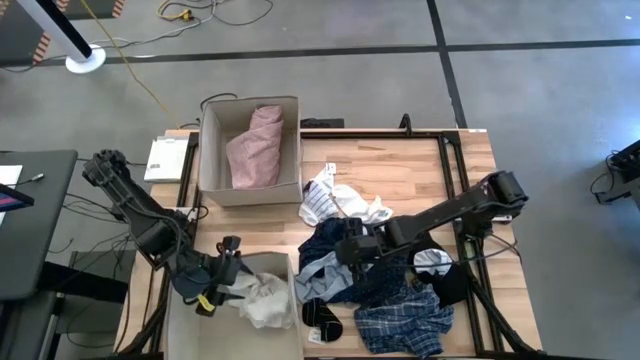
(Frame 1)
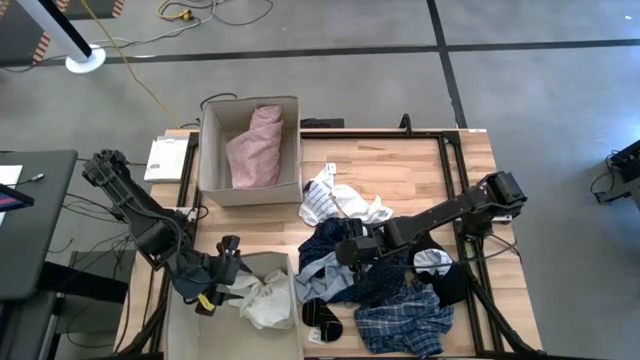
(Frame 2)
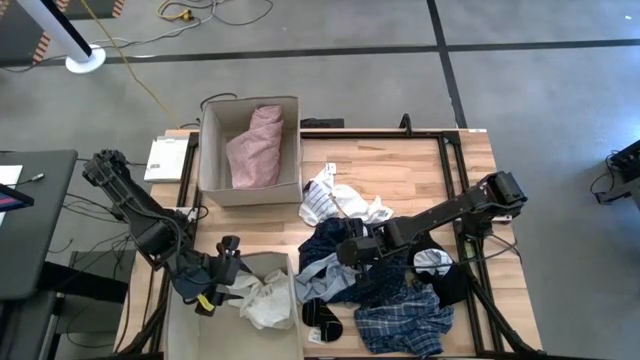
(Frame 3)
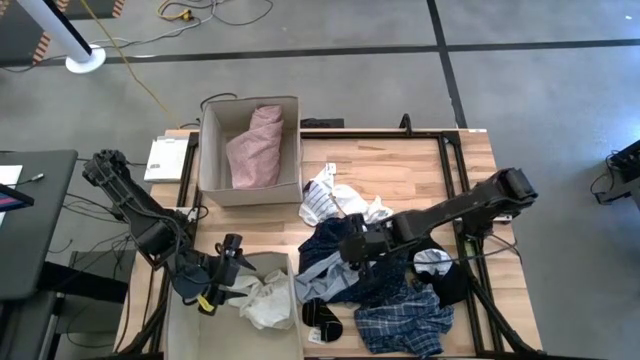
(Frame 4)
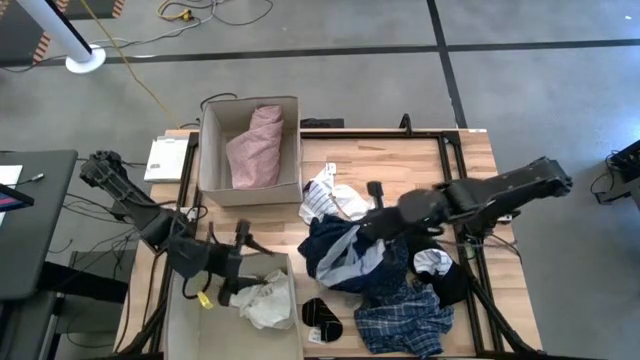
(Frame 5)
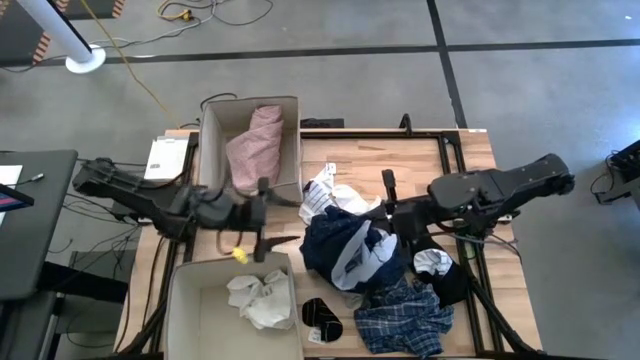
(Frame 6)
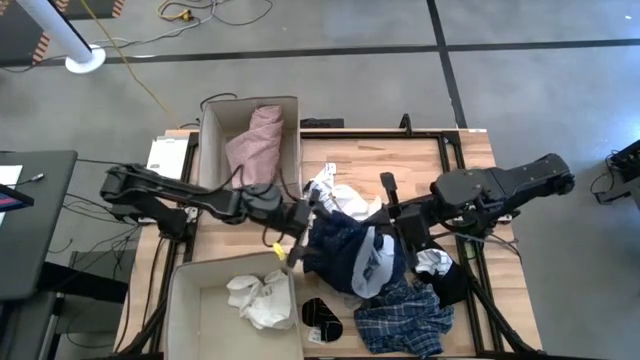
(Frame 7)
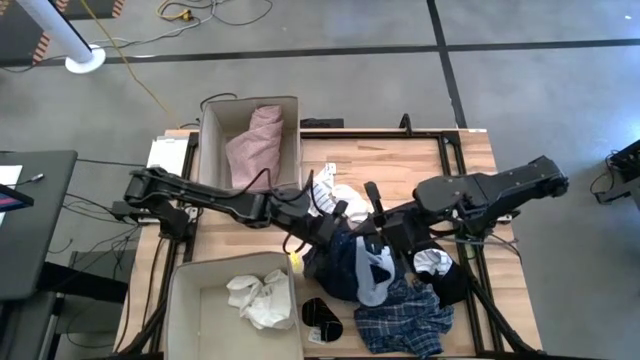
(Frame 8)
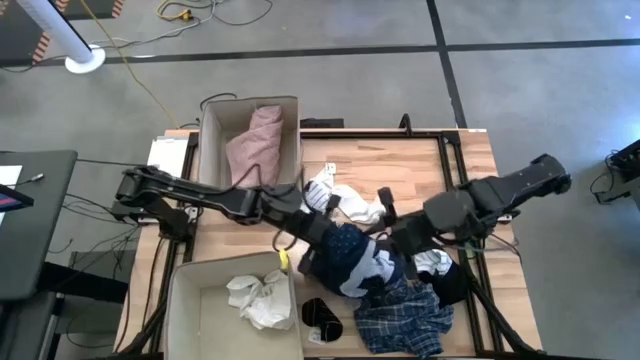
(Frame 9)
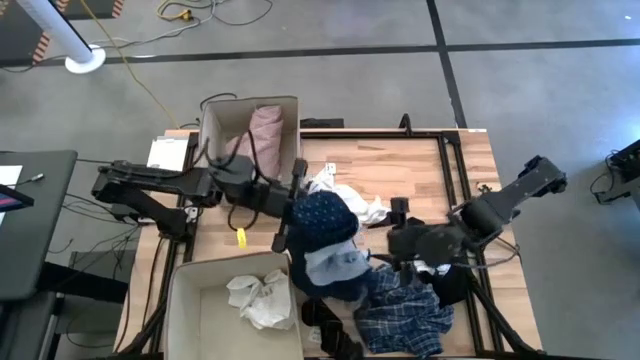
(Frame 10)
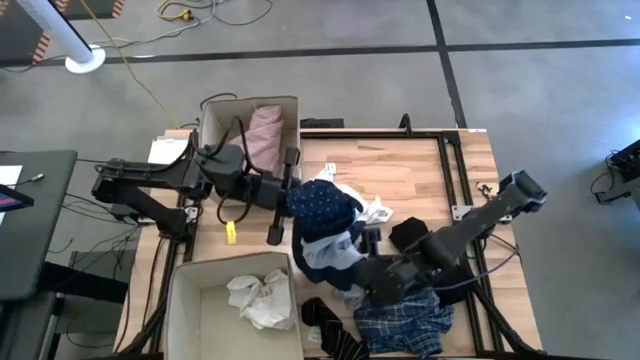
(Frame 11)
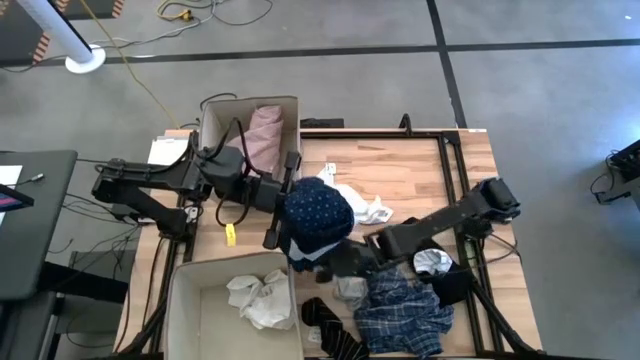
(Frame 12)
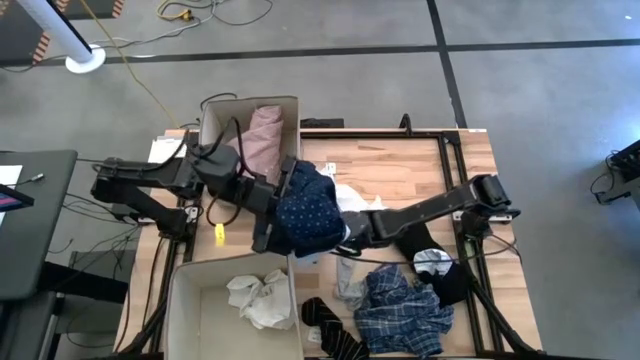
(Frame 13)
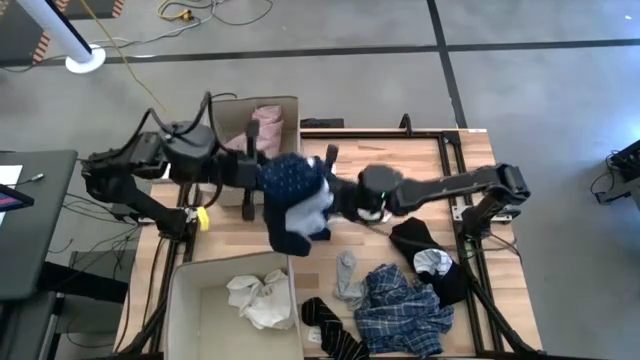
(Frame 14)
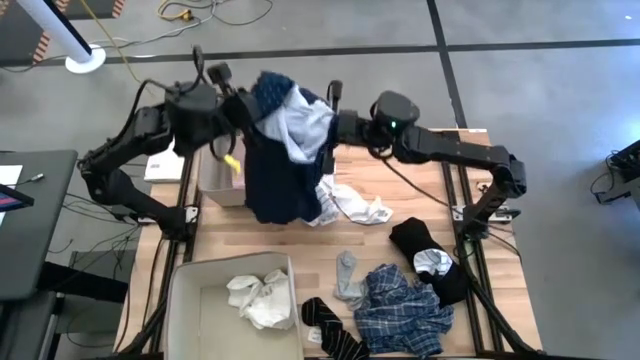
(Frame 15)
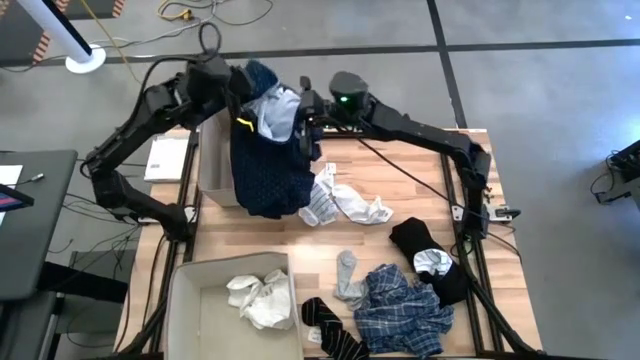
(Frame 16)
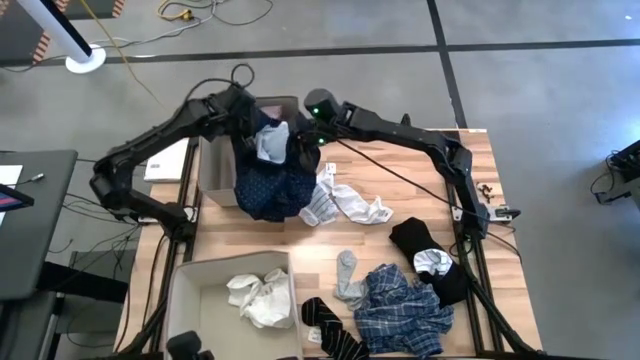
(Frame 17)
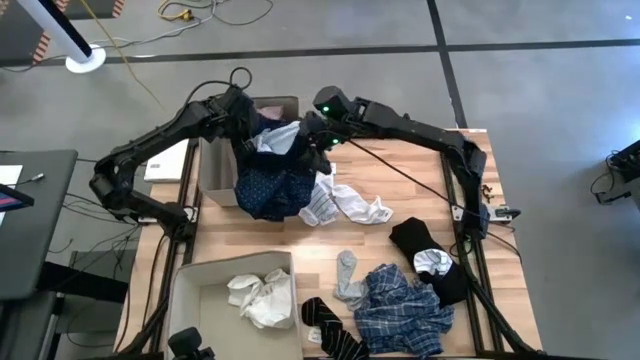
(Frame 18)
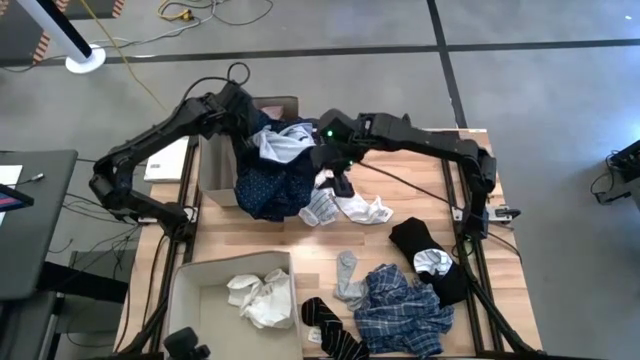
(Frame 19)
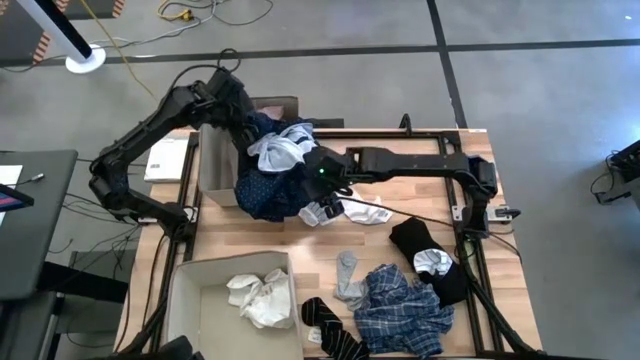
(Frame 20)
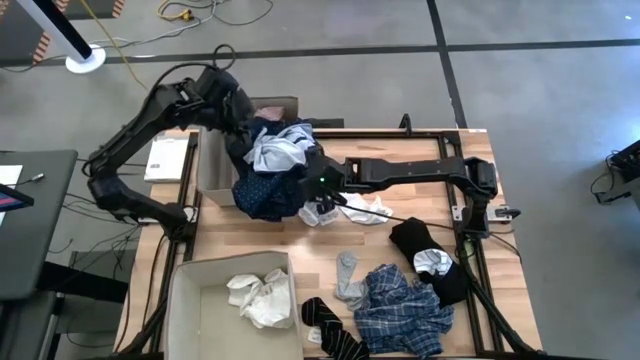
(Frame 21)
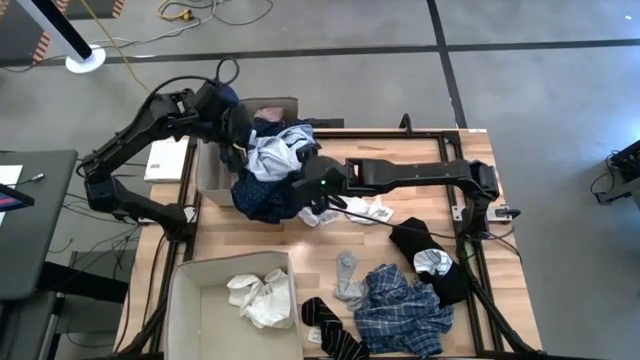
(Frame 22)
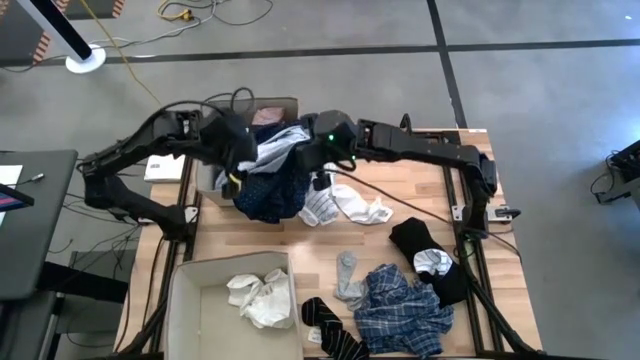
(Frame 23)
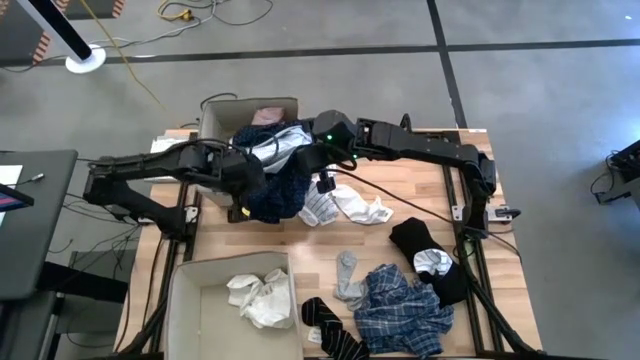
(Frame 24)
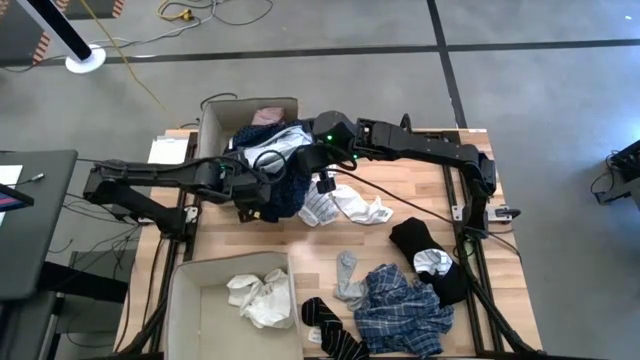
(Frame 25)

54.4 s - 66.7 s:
Task: Sort clothes
Put the dark blue long sleeve into the top light brown laundry organizer

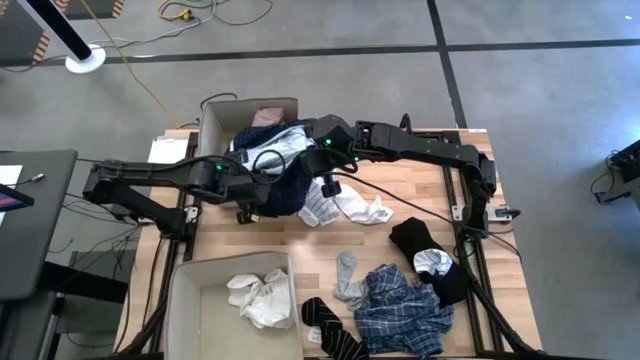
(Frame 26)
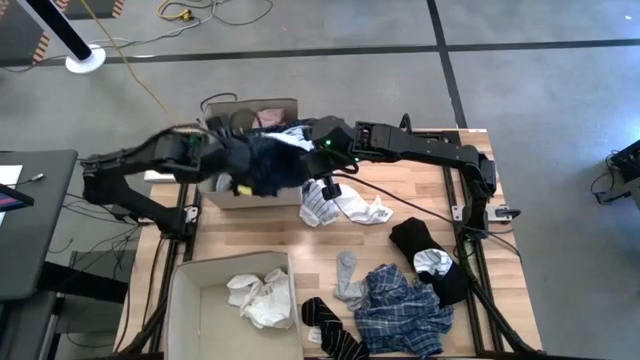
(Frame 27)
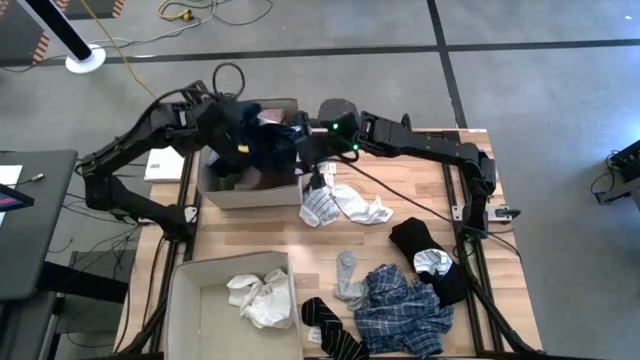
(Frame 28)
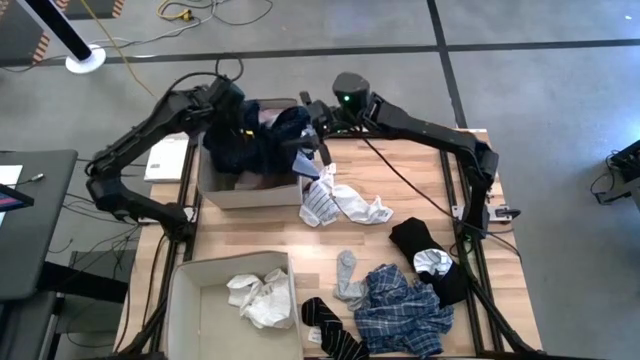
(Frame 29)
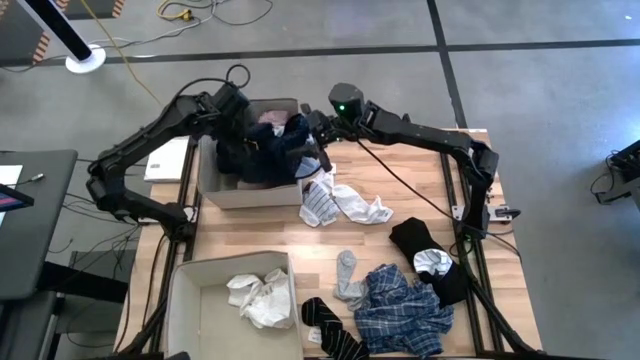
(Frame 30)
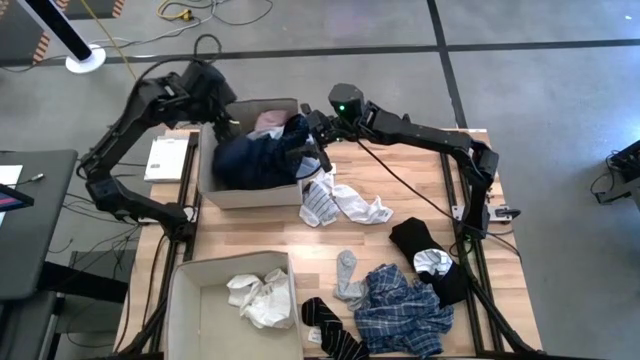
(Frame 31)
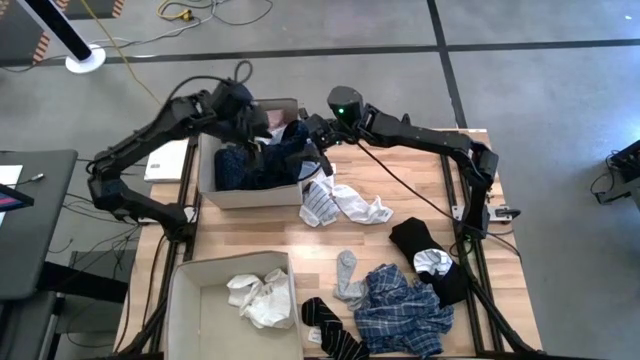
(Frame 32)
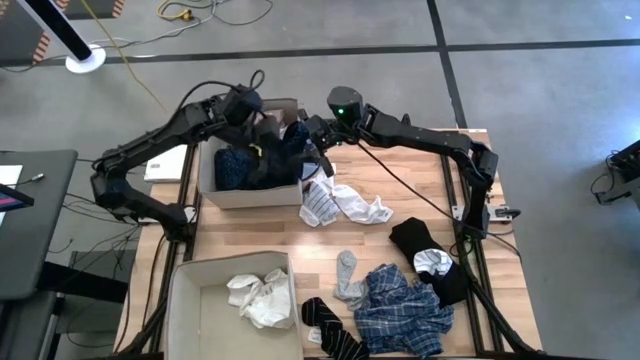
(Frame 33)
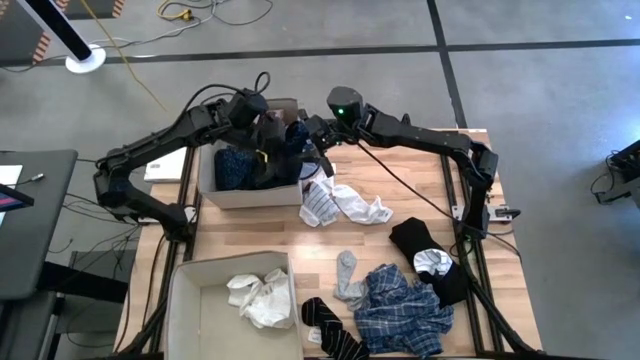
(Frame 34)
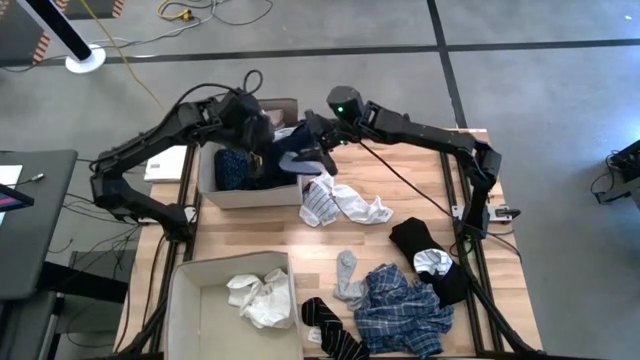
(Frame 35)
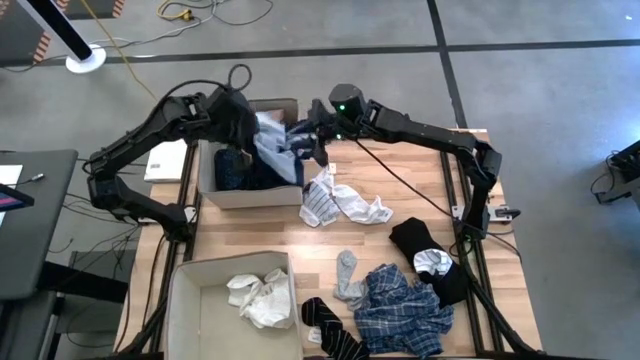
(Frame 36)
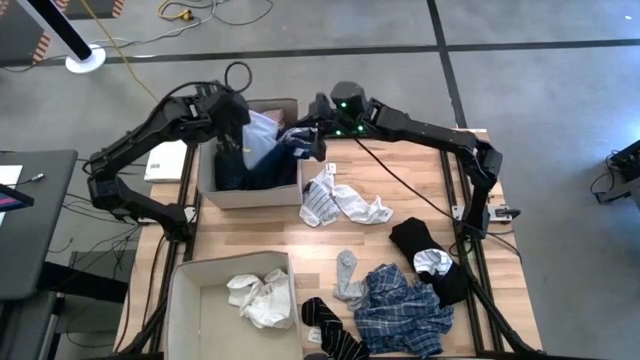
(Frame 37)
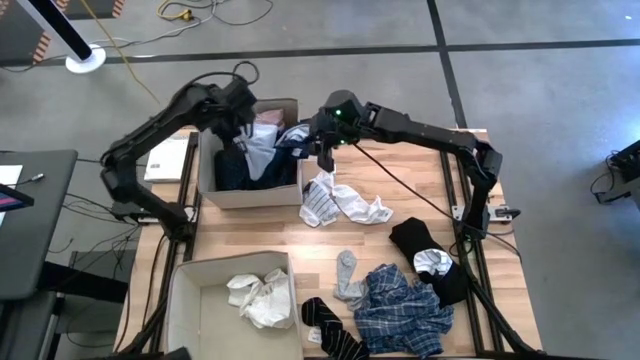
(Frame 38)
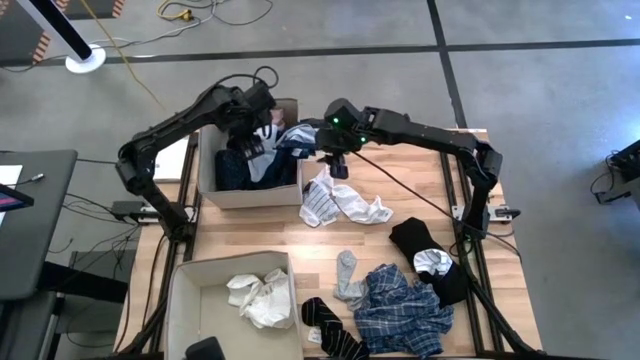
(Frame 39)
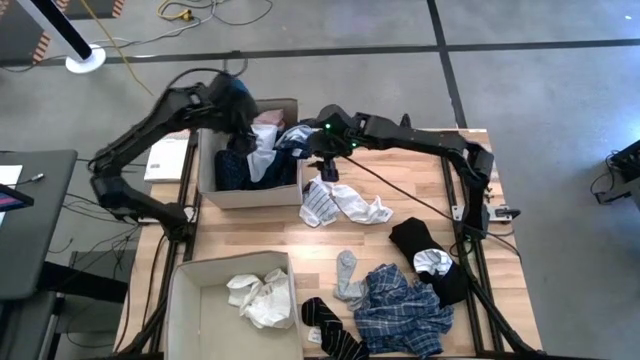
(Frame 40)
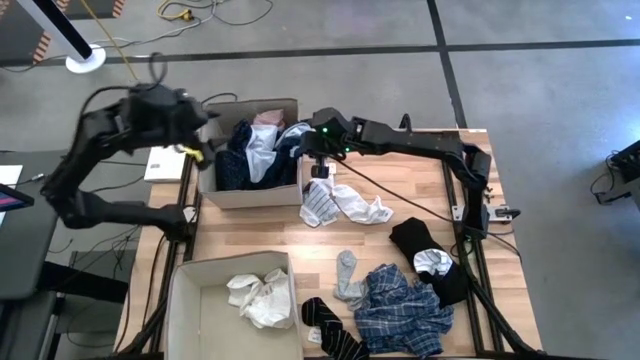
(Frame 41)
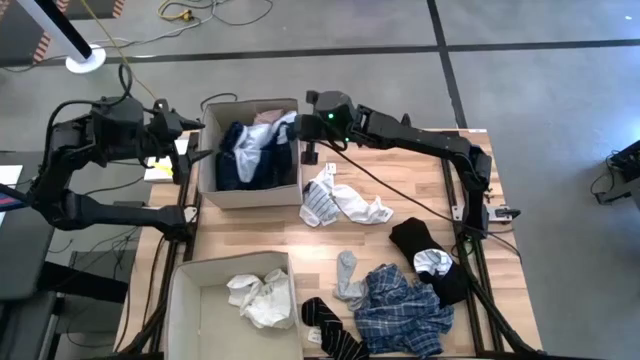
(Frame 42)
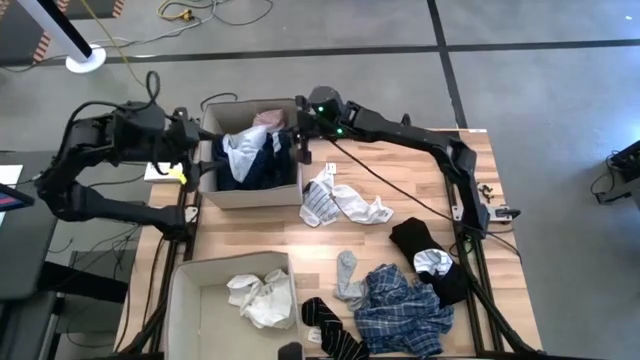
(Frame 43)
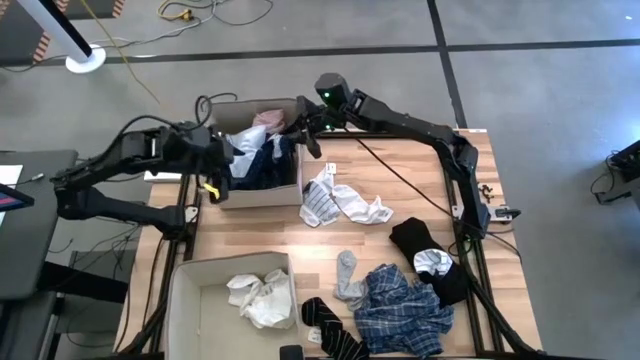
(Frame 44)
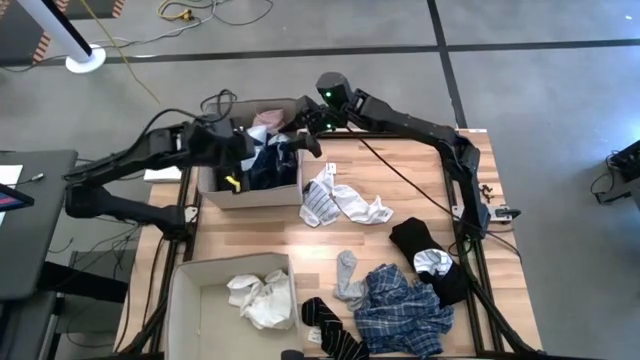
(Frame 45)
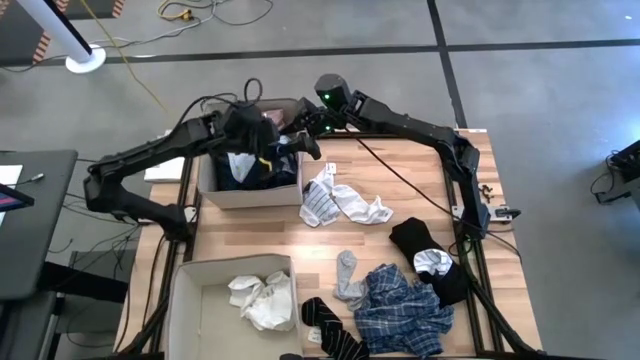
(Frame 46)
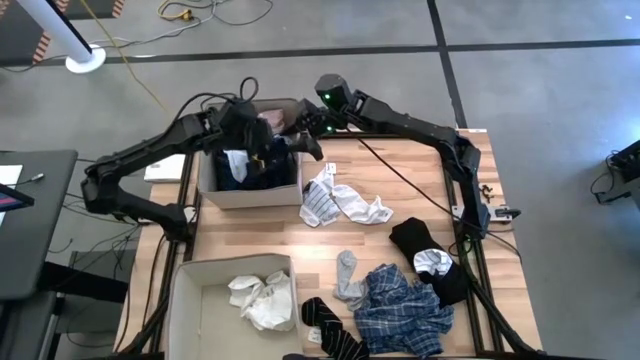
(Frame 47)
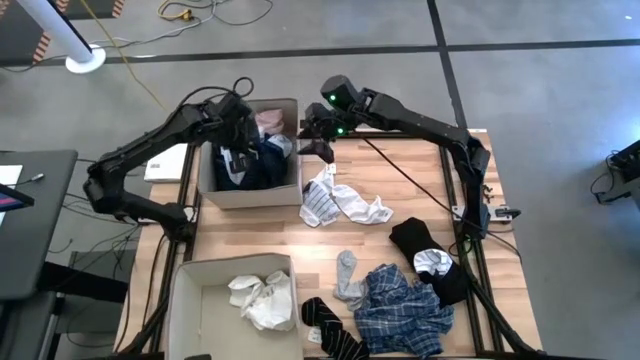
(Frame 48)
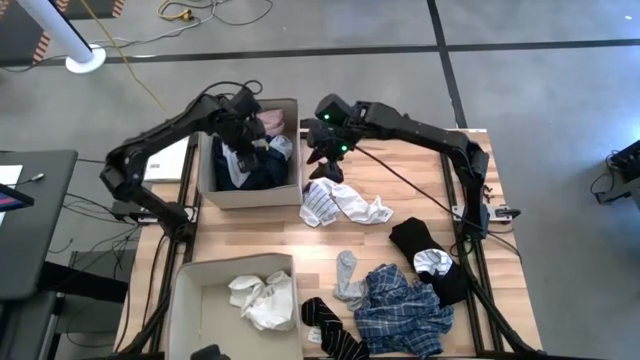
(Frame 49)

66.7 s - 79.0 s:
Put the dark blue long sleeve into the top light brown laundry organizer
